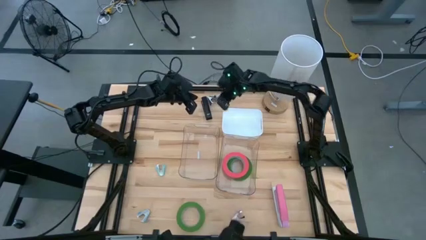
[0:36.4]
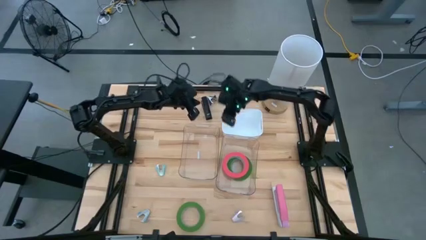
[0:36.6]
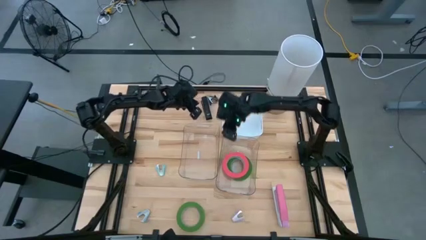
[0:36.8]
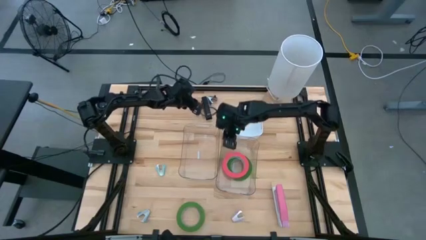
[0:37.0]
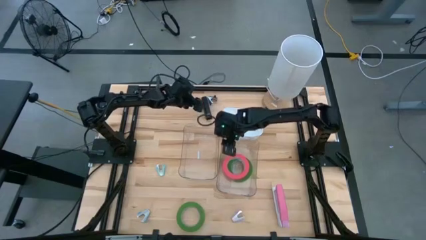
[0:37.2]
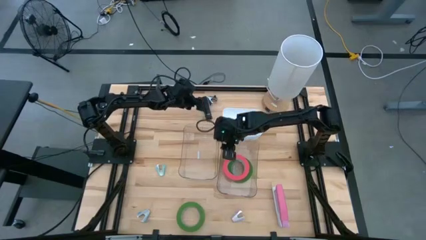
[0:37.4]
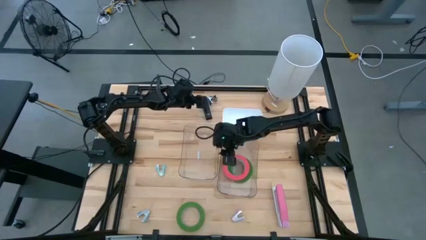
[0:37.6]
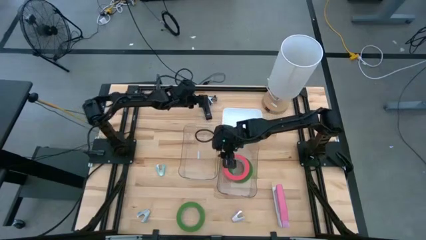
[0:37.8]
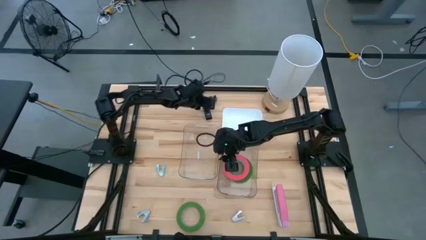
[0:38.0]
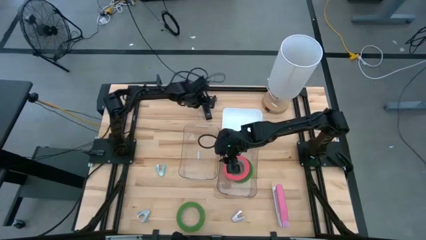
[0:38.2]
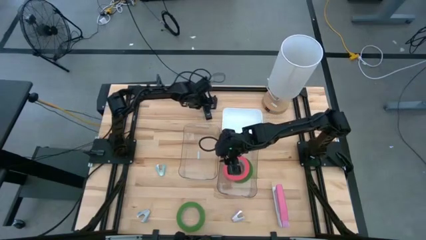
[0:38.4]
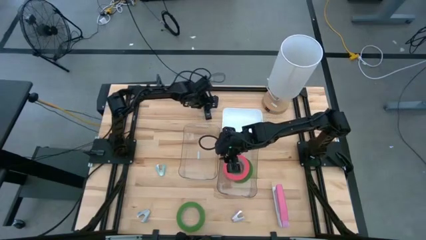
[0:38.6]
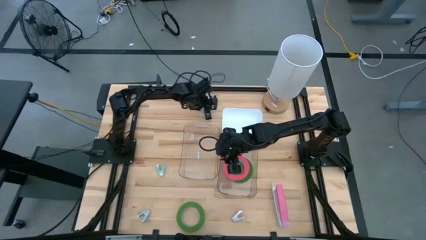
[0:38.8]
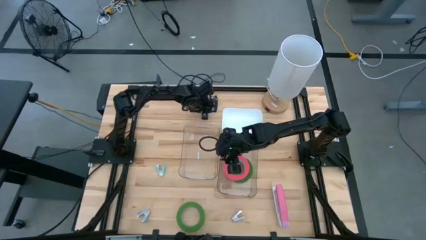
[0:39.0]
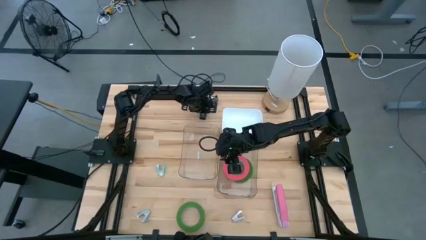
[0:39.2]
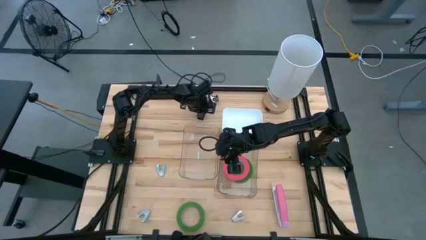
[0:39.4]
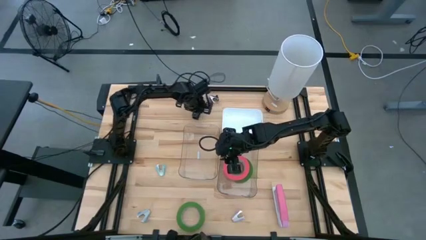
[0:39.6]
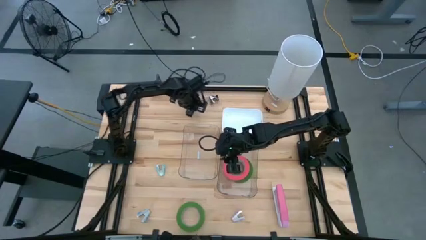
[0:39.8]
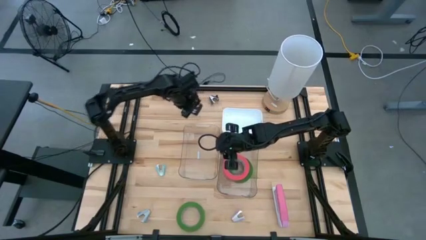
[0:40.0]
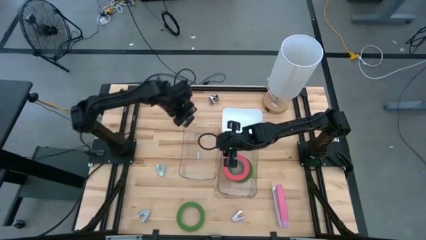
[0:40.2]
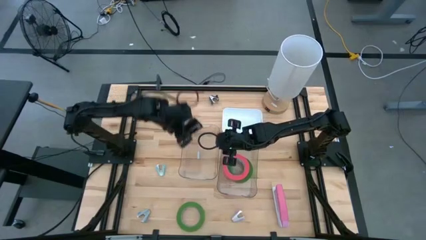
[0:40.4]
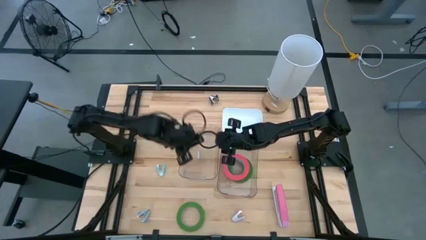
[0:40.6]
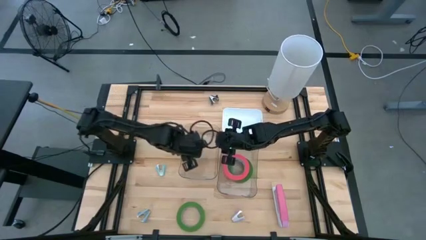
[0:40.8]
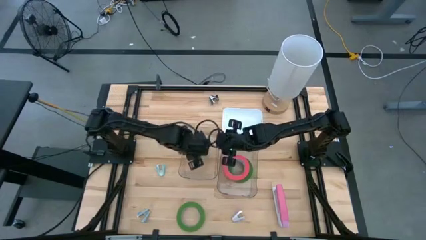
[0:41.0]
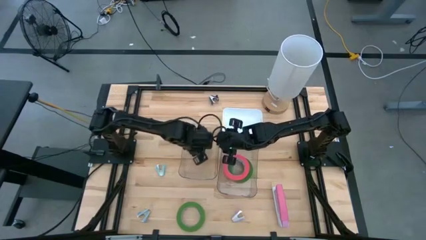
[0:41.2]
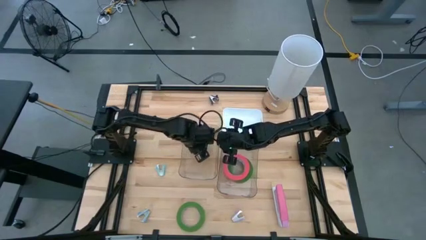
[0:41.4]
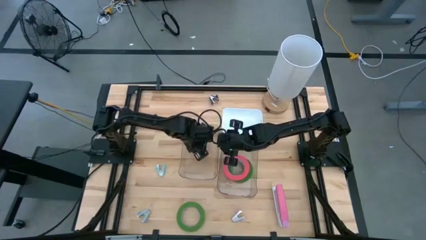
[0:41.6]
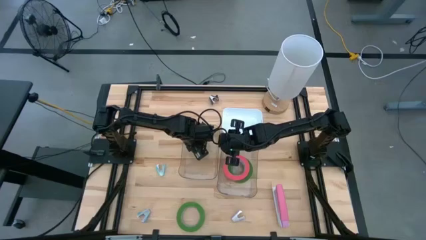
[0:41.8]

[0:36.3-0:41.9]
Task: Pick and place Stapler, Stapler remover, tape
Put the black stapler into the left transparent bin

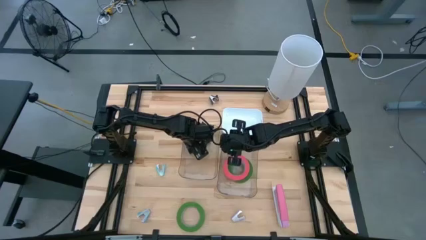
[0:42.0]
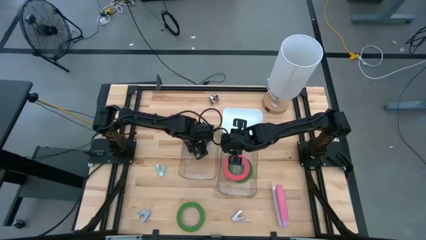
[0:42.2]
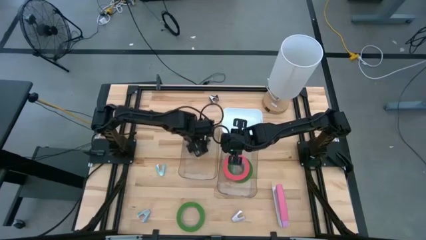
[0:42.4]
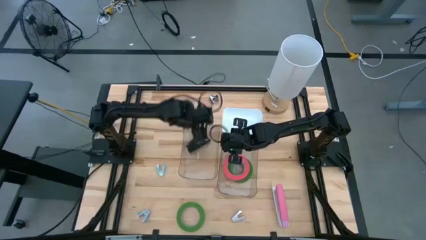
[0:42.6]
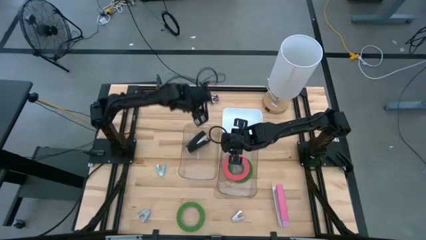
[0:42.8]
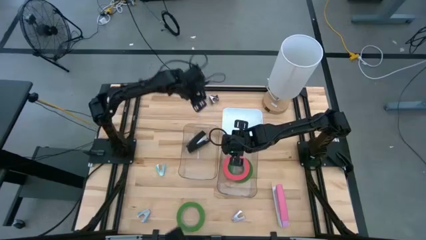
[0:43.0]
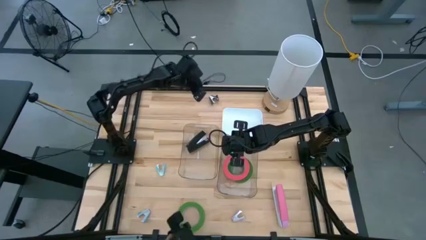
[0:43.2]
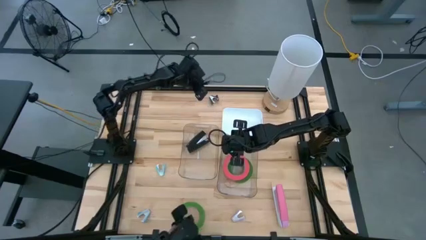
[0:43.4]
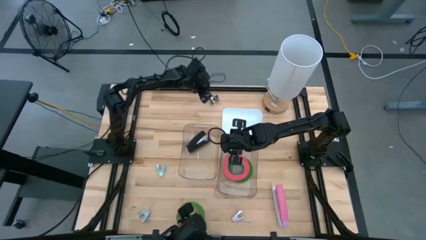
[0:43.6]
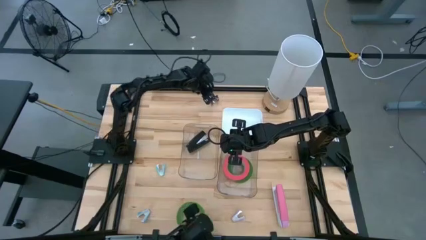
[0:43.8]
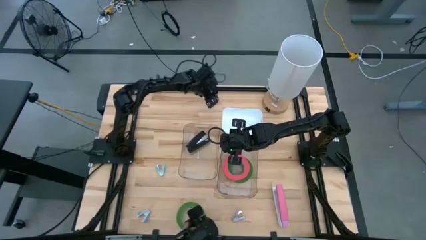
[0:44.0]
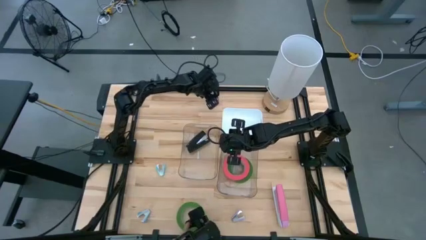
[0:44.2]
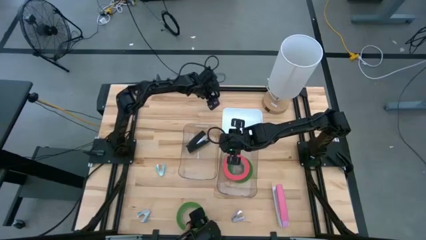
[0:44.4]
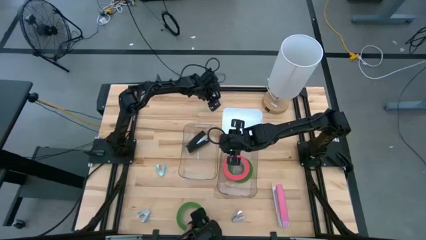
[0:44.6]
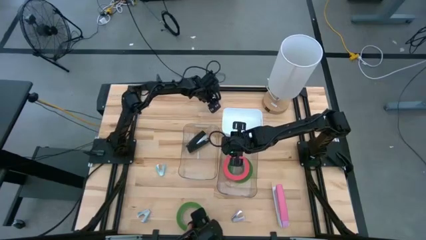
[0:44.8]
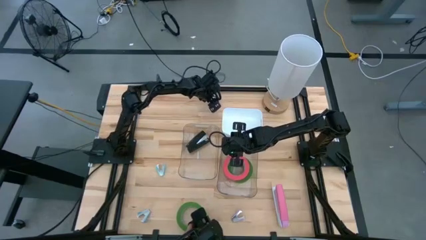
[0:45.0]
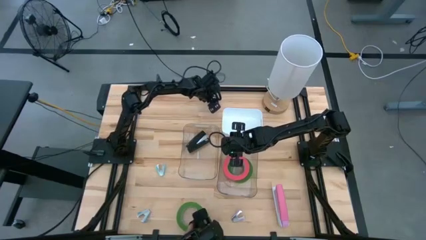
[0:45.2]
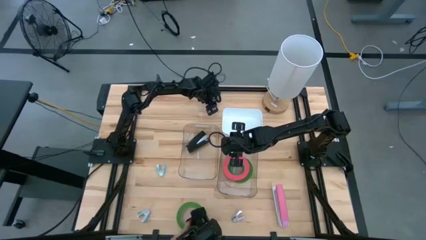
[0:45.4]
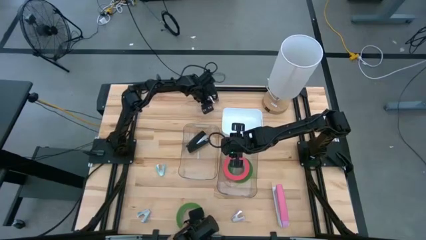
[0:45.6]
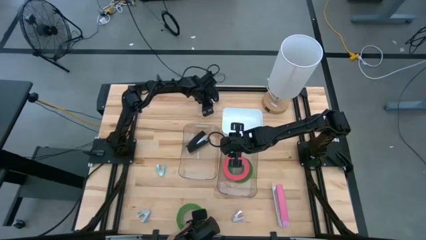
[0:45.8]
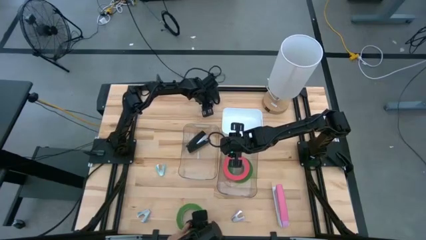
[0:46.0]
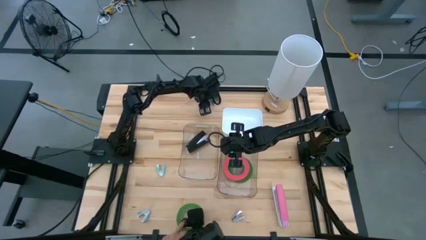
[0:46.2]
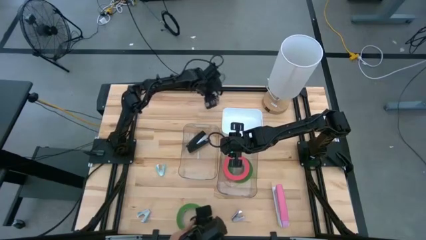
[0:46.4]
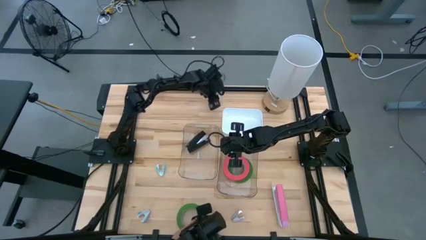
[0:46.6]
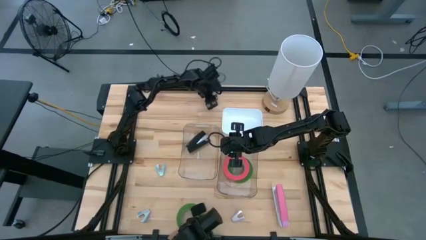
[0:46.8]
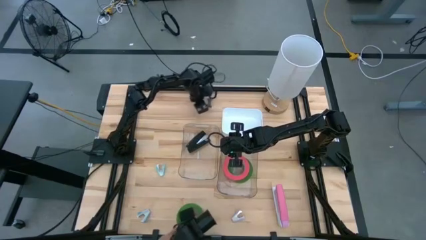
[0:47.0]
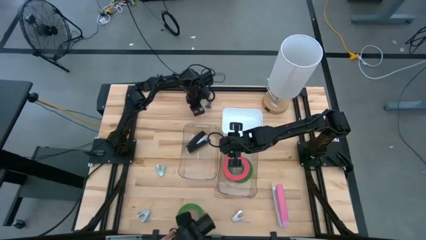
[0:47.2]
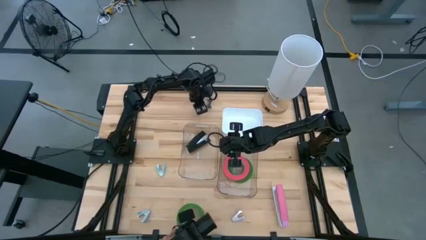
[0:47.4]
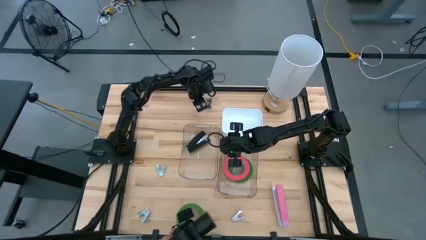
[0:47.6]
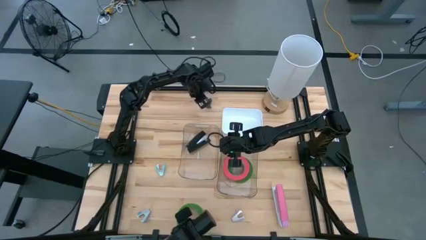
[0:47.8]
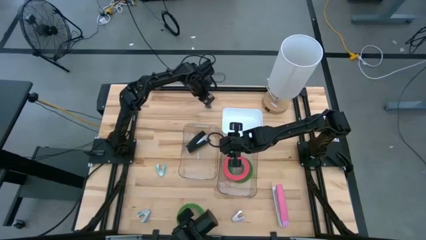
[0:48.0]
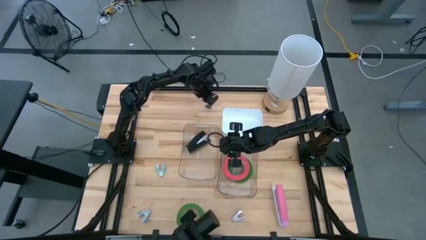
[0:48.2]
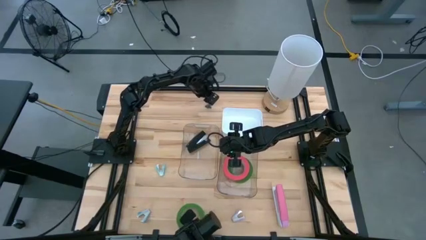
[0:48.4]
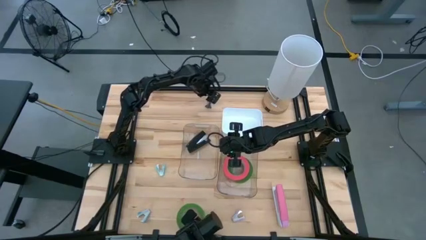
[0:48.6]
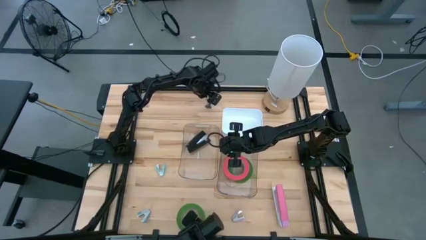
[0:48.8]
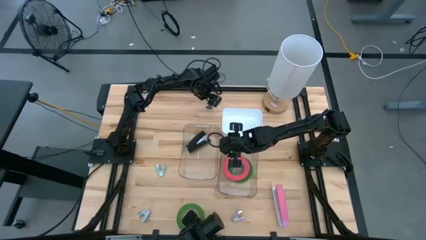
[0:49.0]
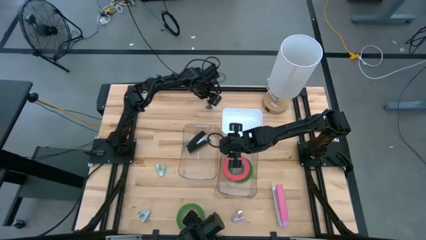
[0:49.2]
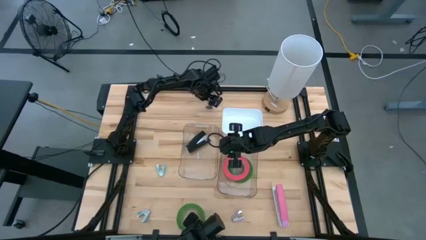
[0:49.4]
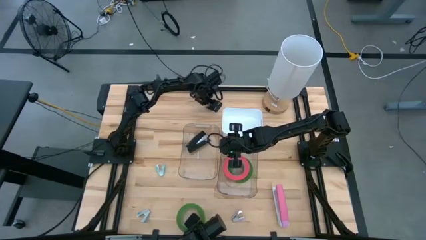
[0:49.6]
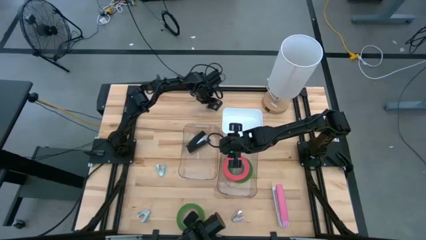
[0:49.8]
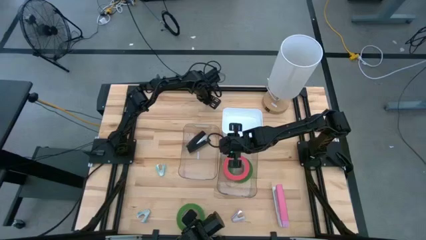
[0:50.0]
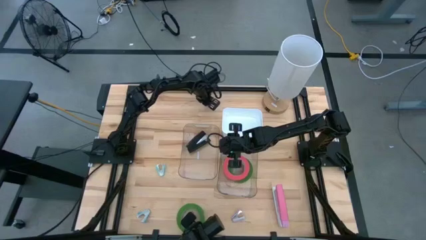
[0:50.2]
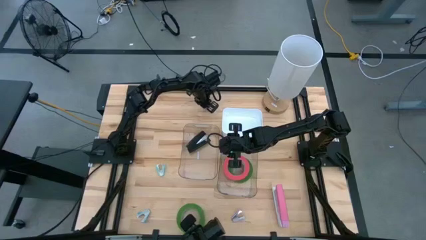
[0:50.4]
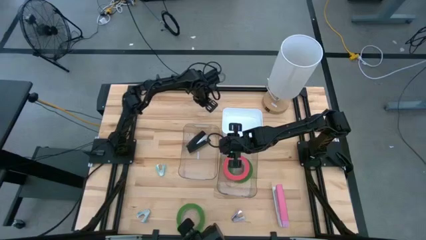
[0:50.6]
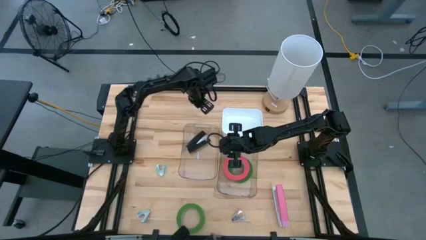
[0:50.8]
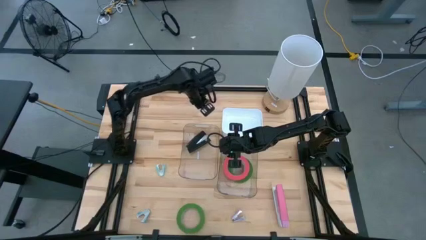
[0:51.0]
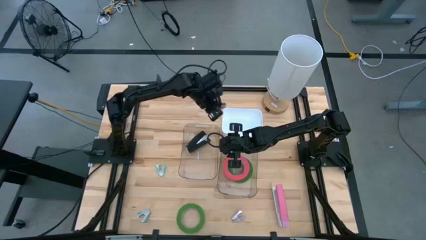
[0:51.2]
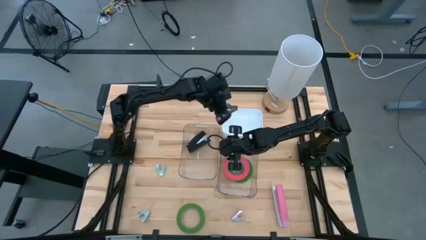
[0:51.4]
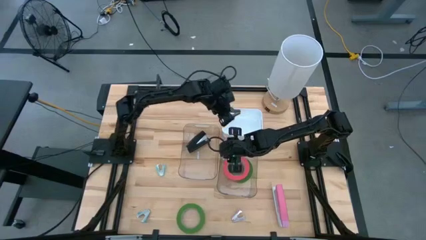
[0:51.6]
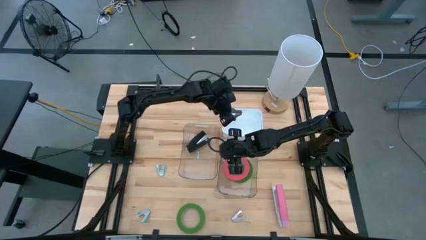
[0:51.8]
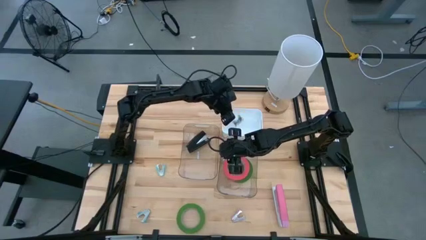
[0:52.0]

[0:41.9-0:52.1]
Put the black staple remover into the white bin
